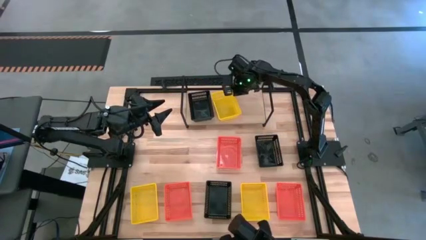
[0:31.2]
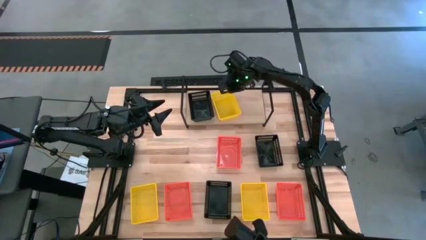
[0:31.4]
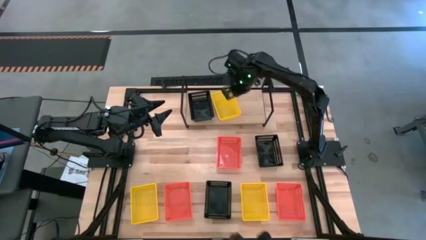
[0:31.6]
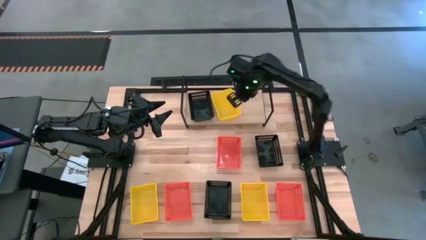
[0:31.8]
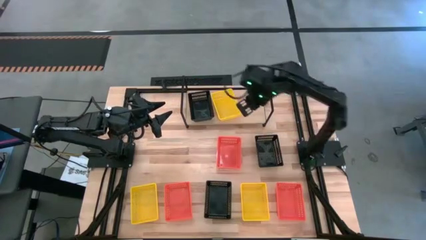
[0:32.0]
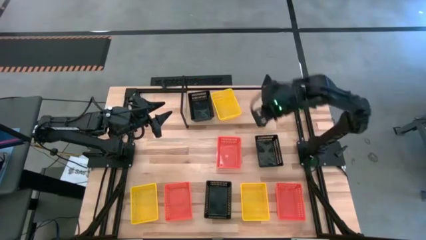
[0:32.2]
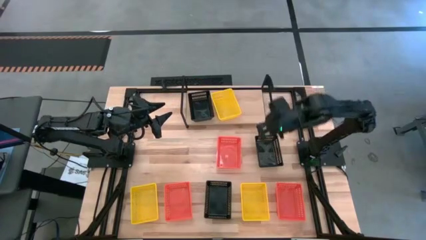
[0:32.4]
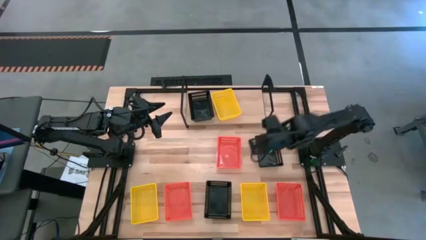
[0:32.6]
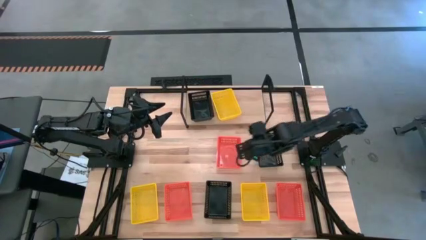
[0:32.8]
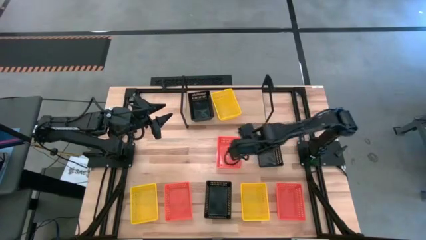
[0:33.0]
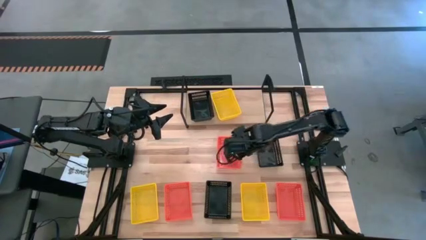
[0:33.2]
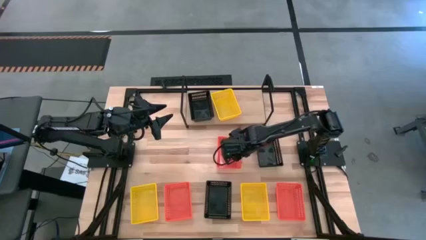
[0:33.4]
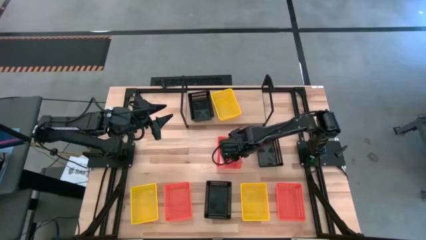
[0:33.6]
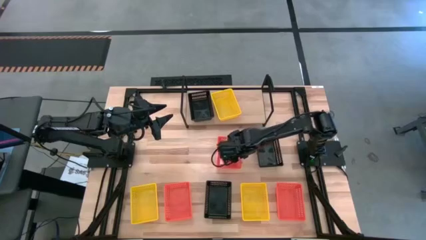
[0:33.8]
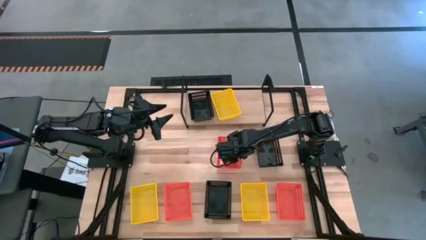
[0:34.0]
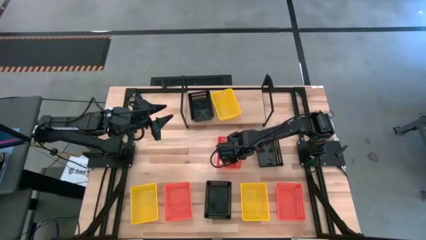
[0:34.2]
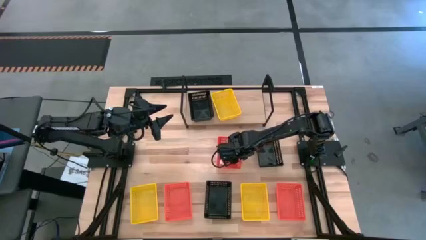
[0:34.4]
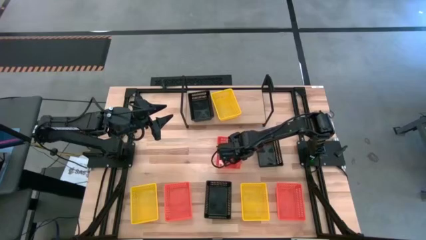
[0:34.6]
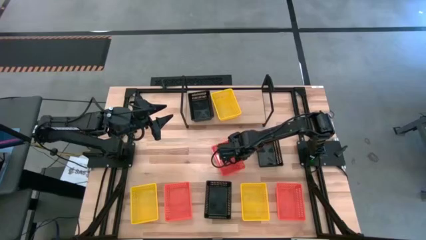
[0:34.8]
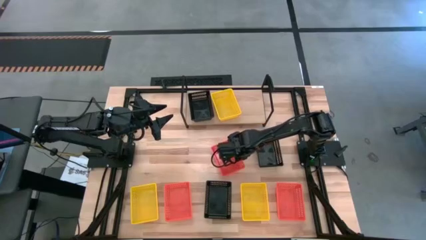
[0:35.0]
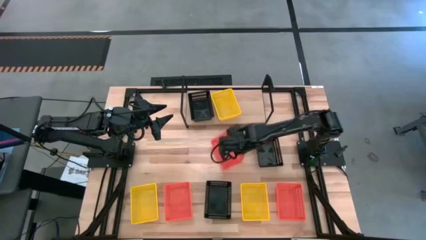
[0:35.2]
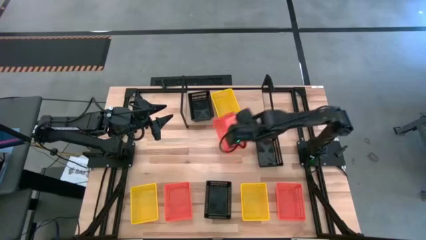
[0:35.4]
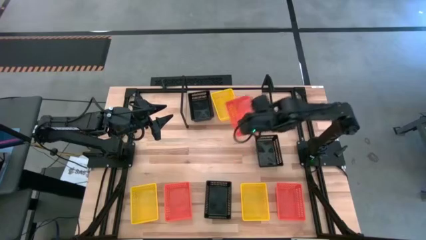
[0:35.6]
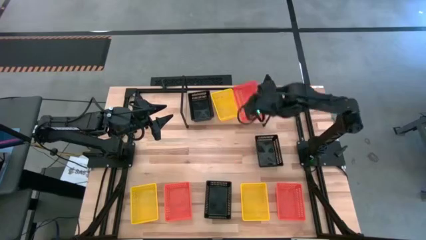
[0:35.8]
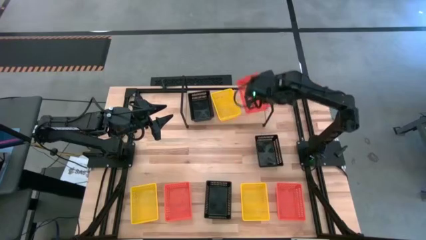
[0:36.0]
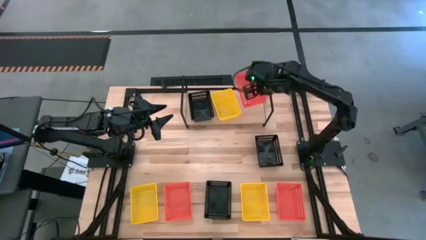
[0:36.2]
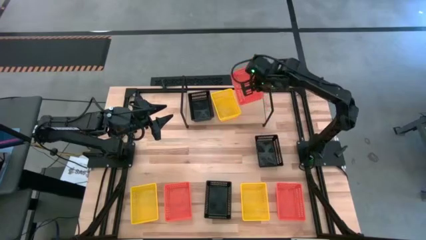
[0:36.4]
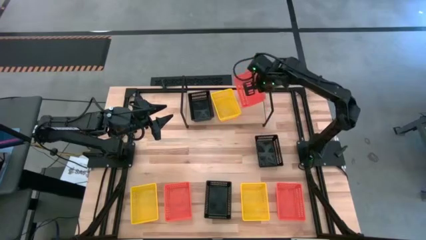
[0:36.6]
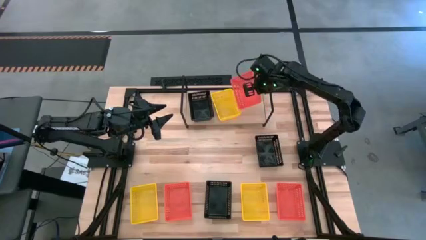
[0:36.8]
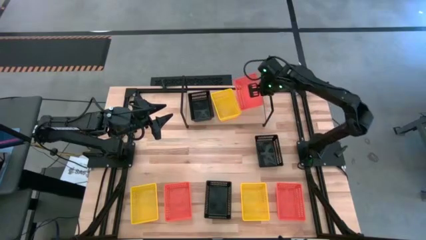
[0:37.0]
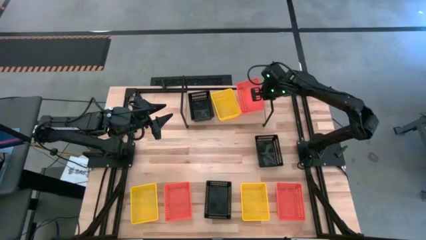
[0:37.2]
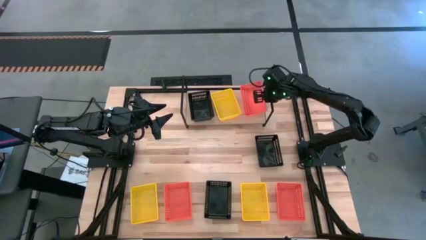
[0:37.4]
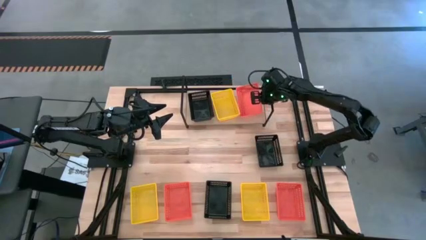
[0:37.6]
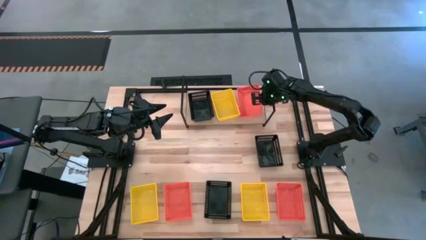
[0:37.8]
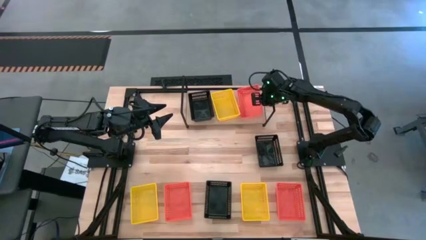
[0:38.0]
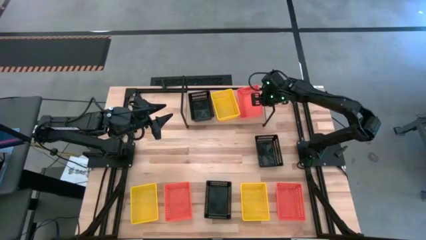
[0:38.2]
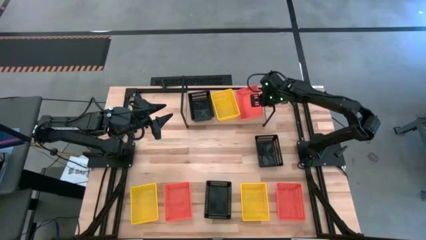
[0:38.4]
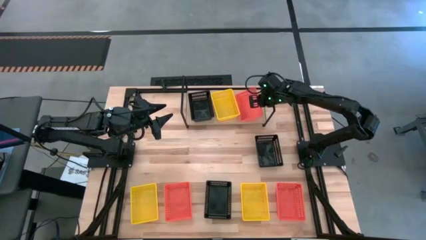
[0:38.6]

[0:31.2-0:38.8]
Task: Stack baskets on shelf by color
Put the top orange bin on the shelf

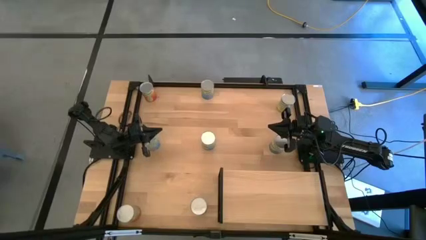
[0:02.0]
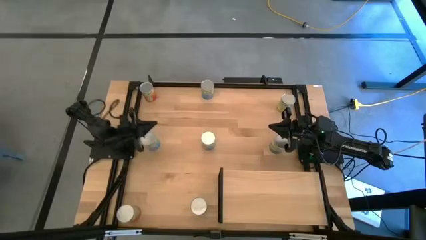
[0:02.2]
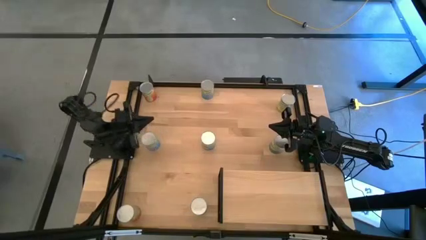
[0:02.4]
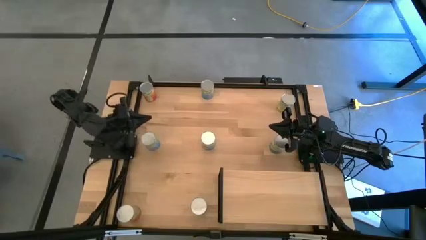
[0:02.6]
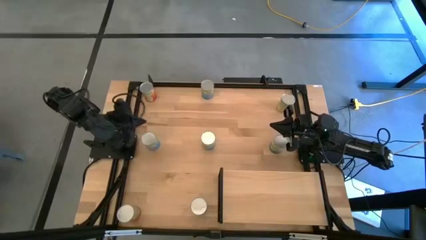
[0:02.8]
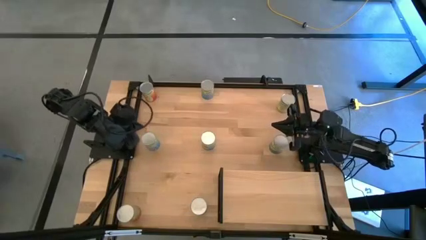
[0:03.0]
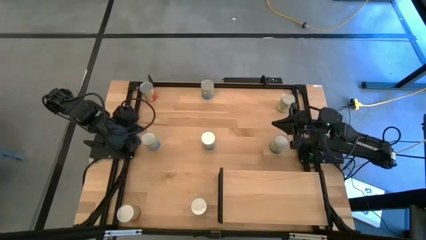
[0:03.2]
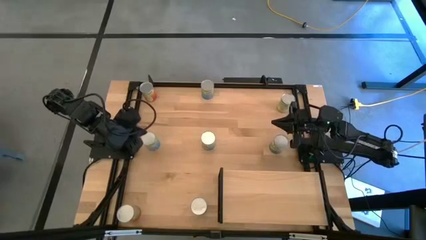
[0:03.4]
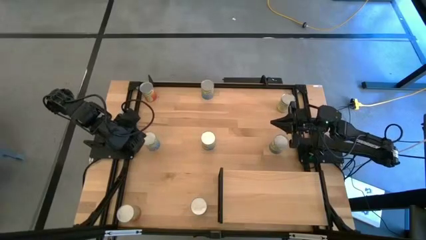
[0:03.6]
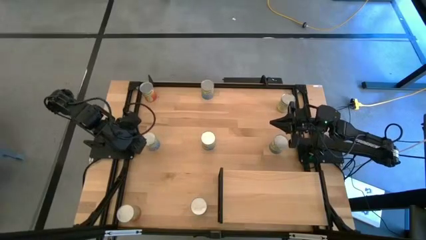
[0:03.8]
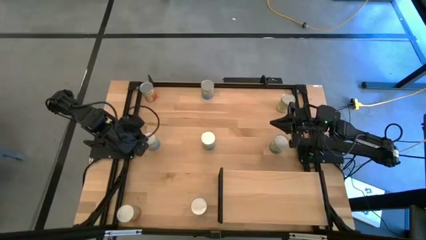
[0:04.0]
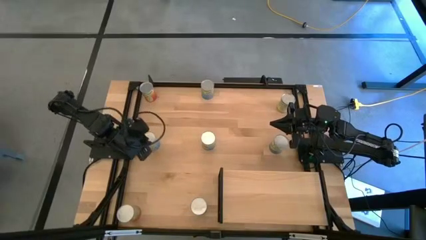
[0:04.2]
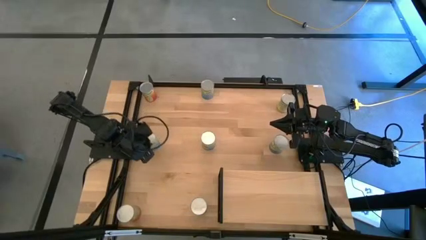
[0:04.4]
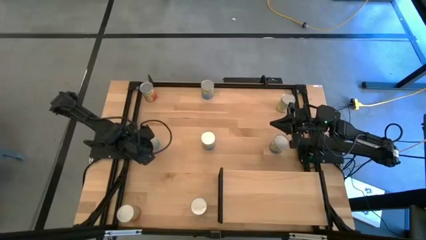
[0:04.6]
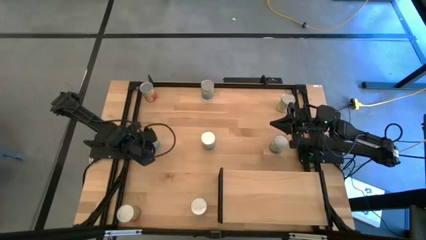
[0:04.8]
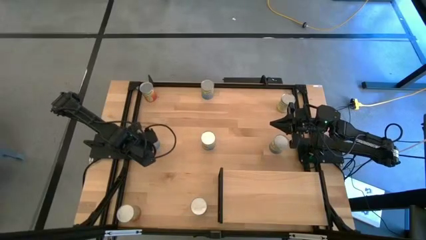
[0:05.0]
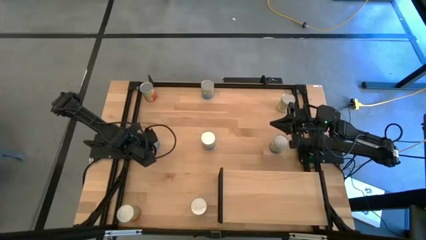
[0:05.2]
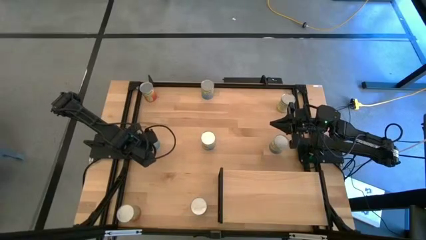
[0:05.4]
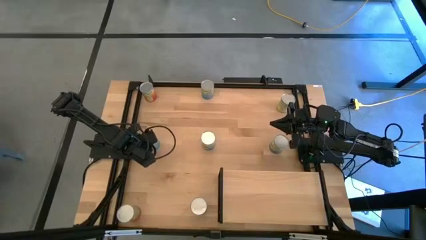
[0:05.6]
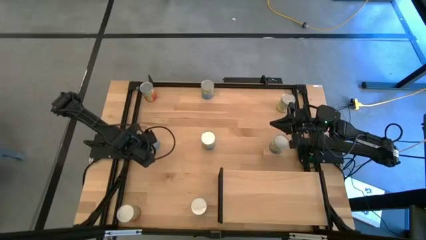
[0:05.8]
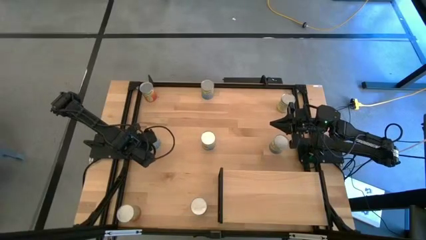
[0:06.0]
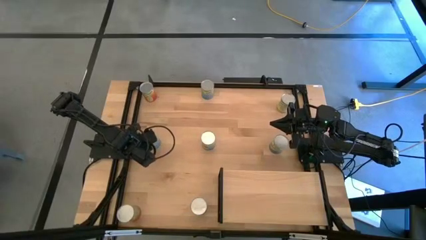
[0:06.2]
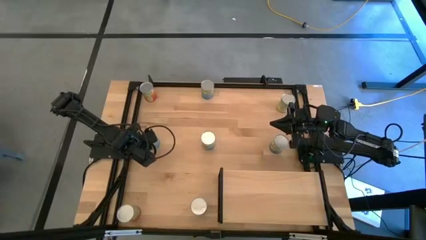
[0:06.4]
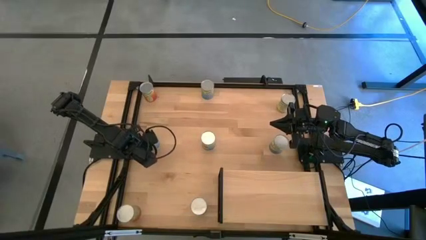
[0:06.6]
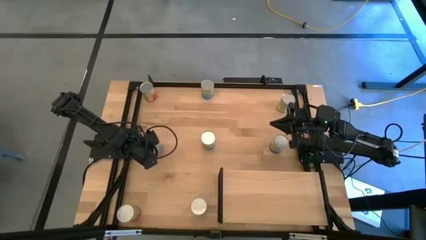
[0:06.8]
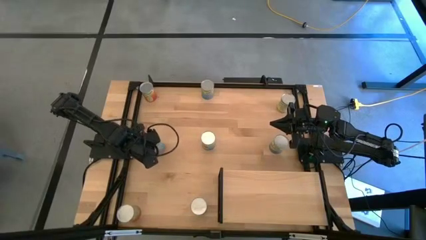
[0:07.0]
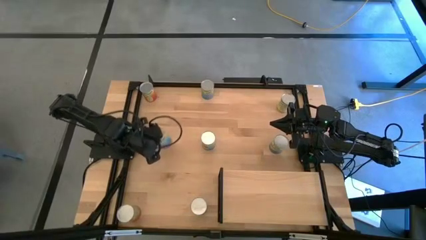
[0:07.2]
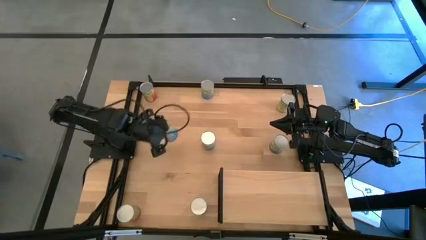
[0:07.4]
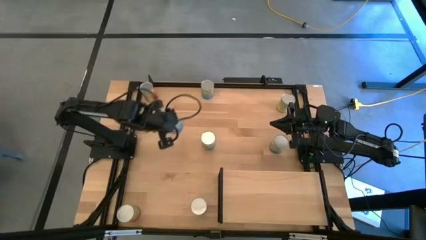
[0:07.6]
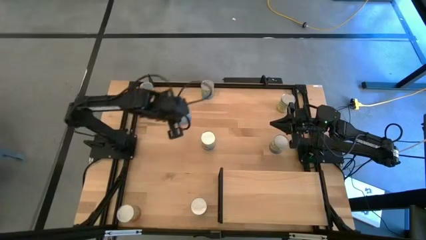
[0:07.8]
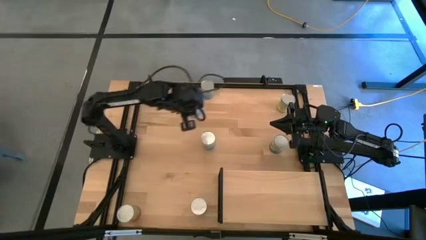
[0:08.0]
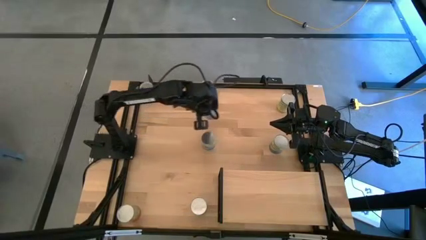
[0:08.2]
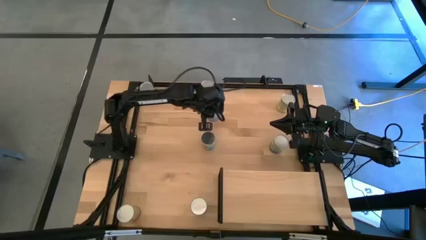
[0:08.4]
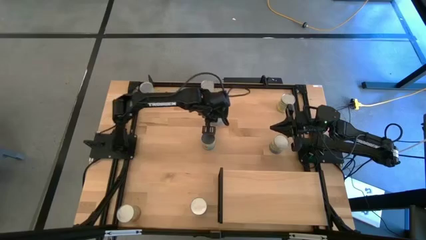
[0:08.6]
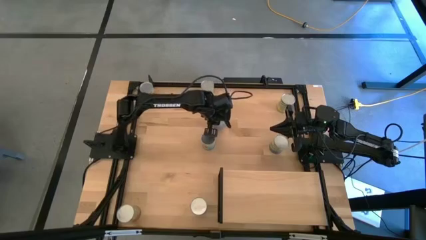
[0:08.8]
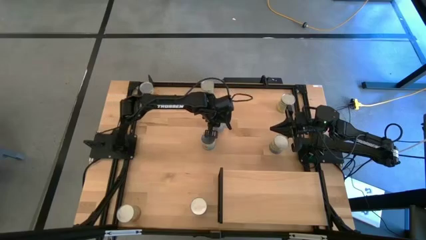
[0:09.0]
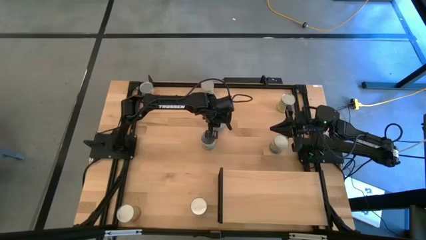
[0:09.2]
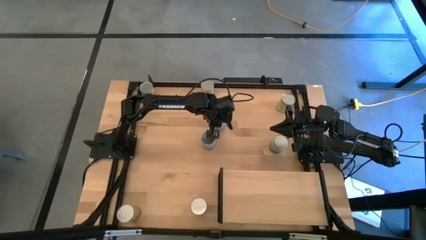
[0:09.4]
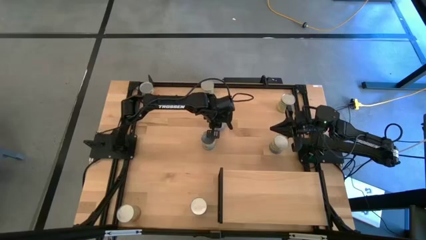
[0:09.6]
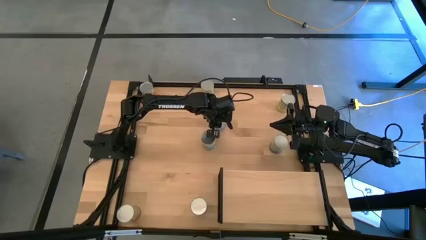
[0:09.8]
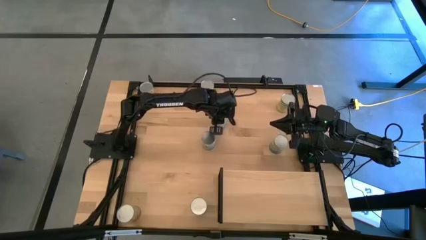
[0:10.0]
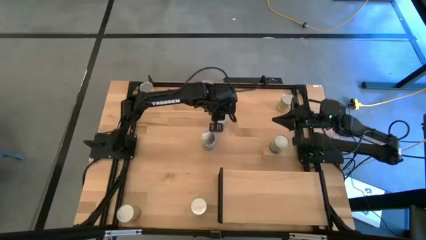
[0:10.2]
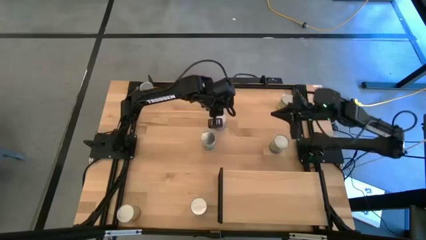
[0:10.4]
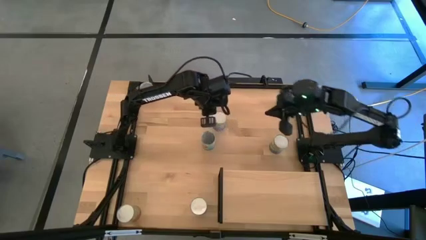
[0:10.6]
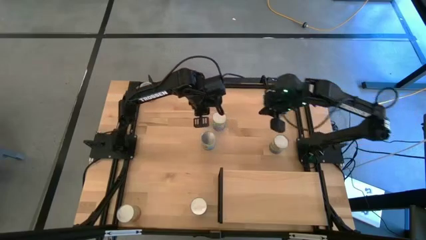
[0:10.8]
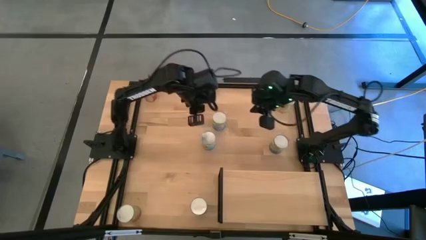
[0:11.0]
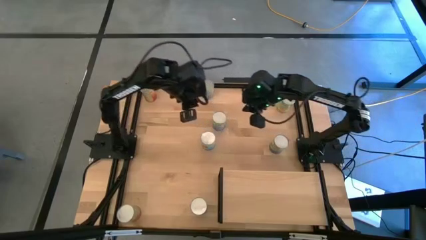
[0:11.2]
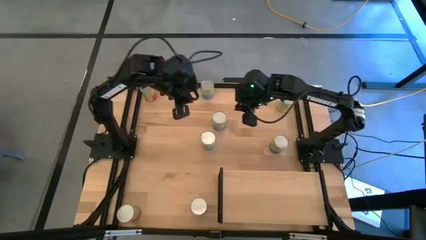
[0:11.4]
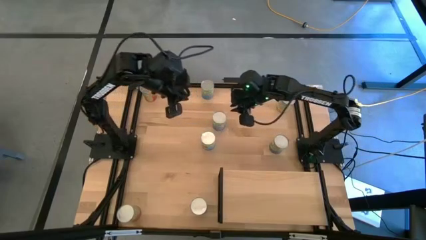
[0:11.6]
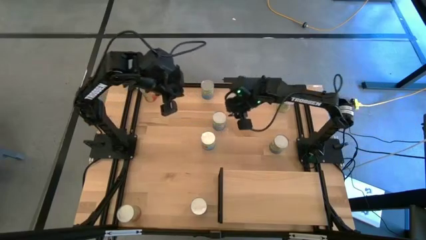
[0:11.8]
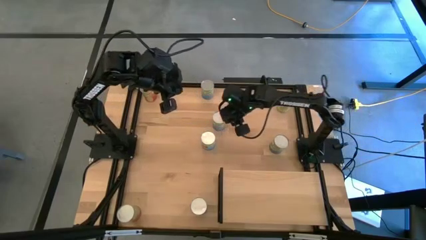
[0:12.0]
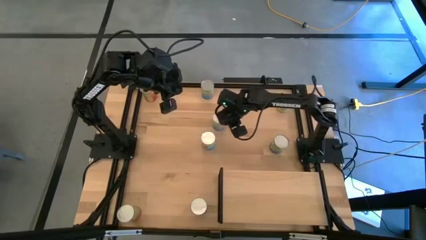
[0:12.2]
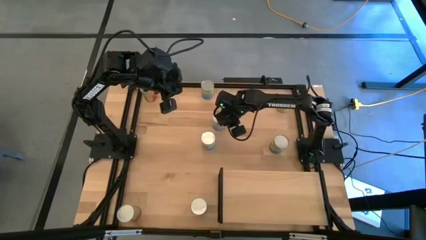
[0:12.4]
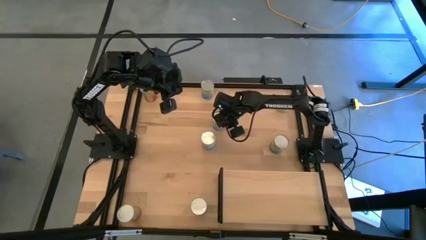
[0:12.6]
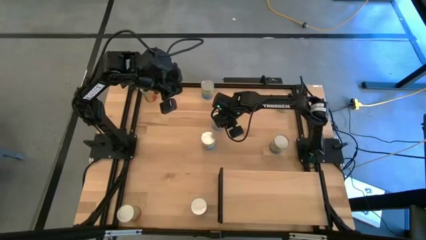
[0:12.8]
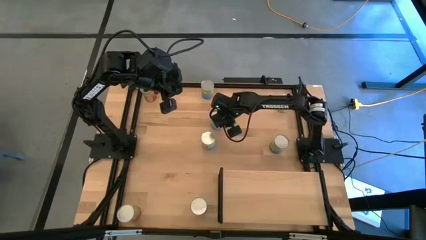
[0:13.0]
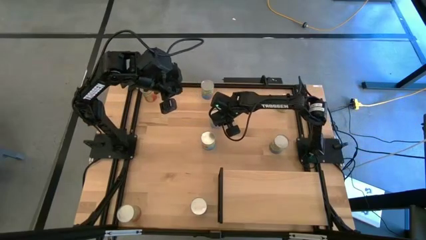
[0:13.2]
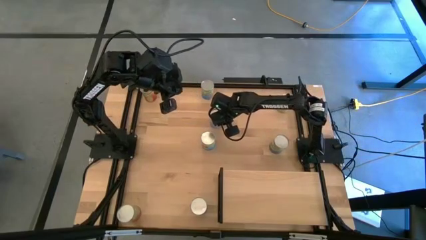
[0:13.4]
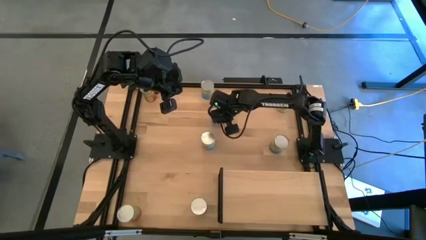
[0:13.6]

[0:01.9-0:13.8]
Task: Pick and place cans onto a shelf
Put the bottom canned cherries can on the shelf
